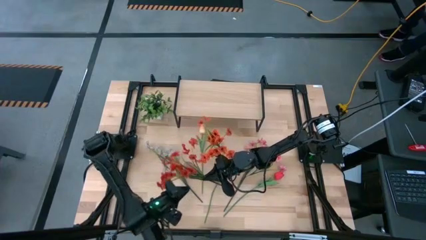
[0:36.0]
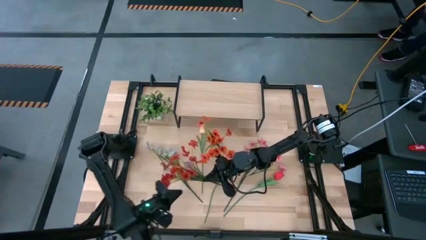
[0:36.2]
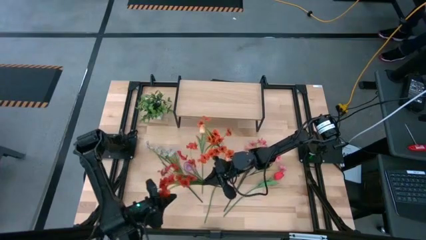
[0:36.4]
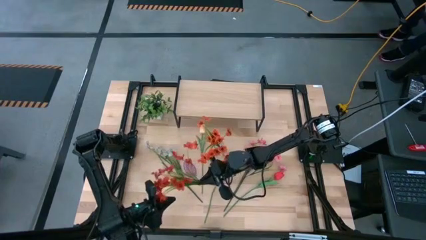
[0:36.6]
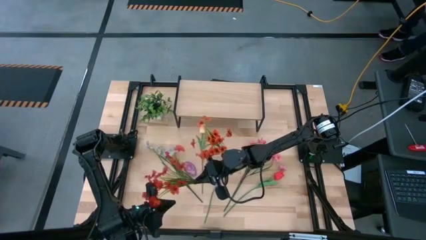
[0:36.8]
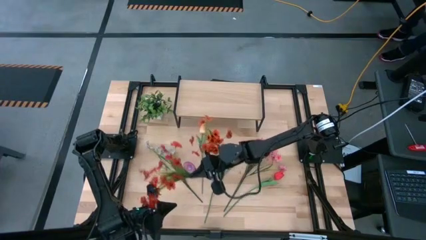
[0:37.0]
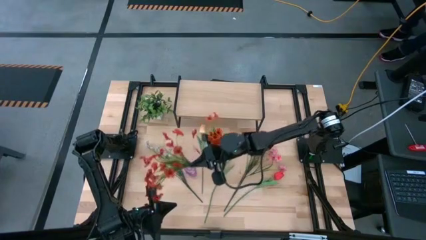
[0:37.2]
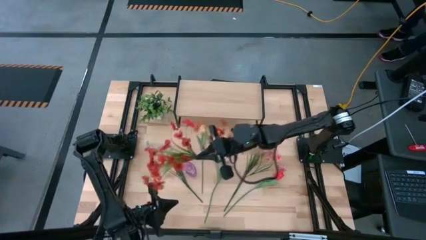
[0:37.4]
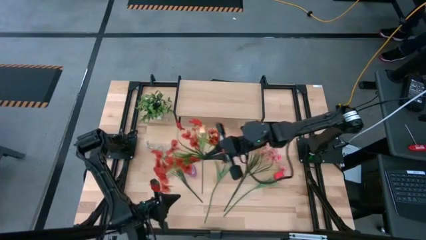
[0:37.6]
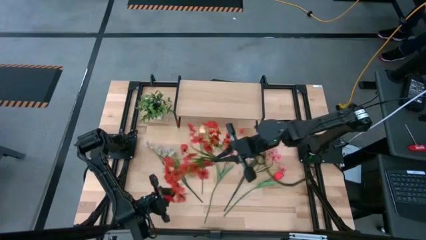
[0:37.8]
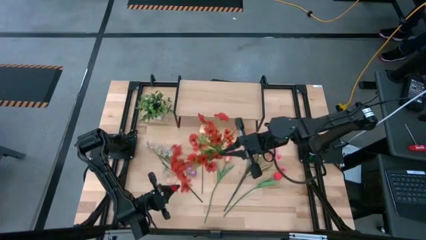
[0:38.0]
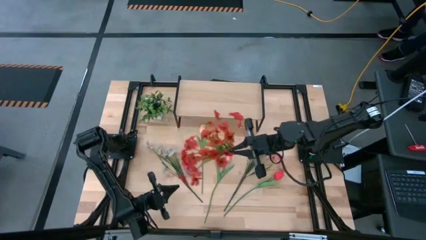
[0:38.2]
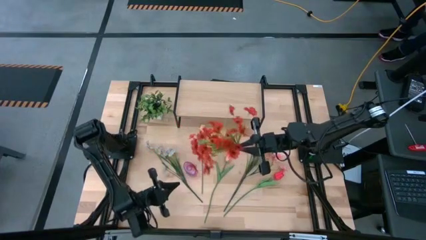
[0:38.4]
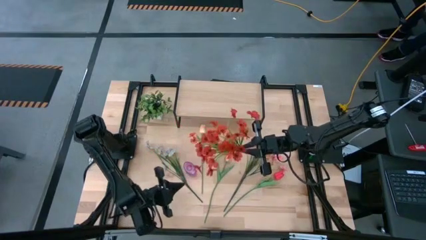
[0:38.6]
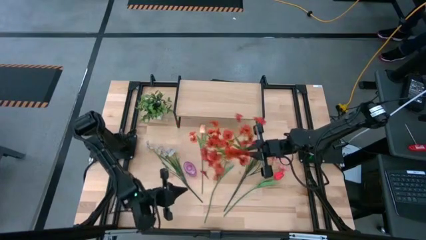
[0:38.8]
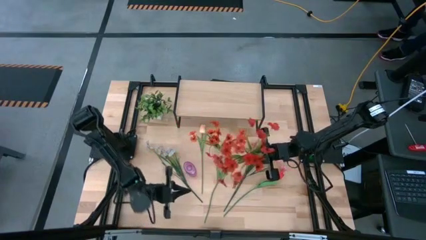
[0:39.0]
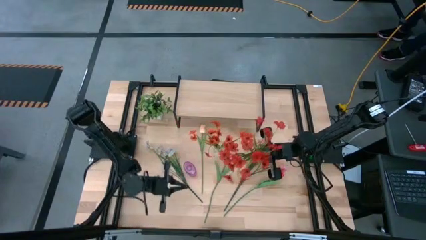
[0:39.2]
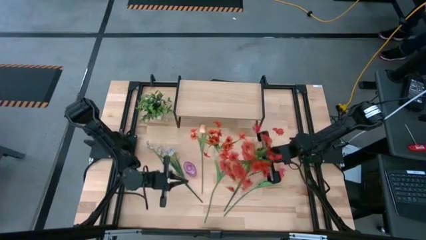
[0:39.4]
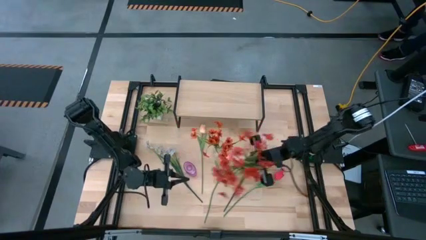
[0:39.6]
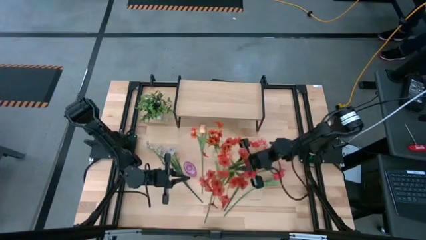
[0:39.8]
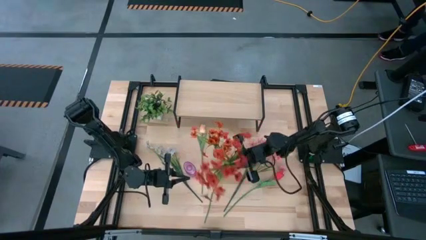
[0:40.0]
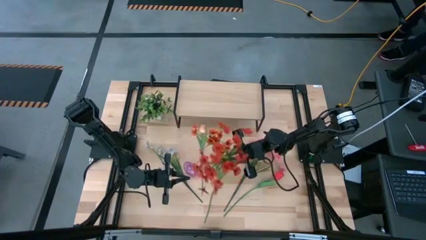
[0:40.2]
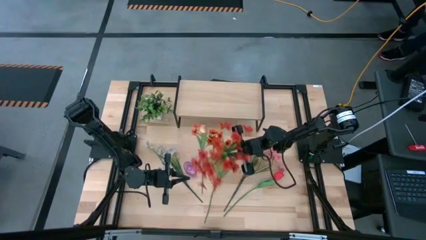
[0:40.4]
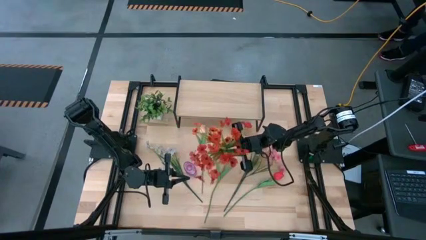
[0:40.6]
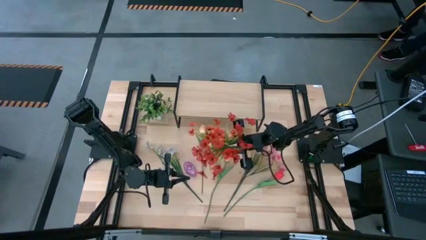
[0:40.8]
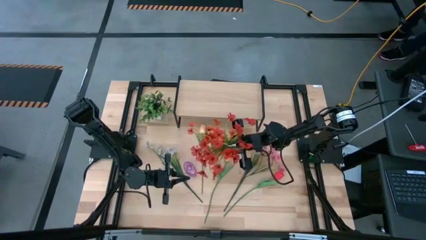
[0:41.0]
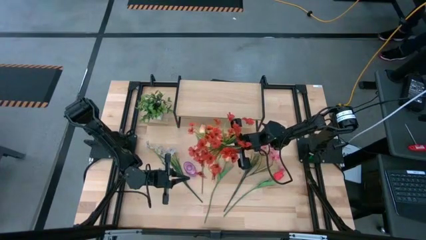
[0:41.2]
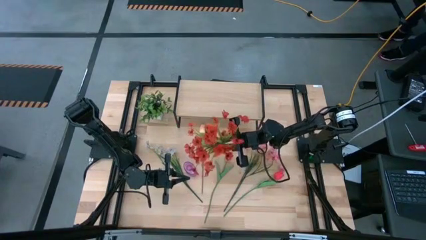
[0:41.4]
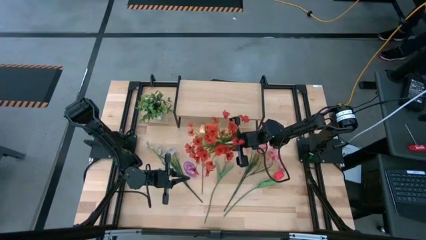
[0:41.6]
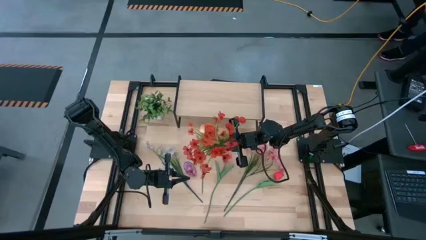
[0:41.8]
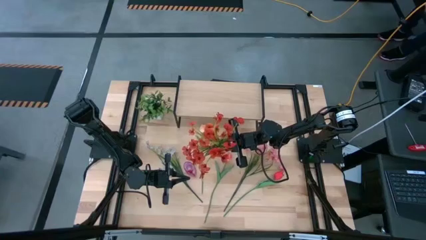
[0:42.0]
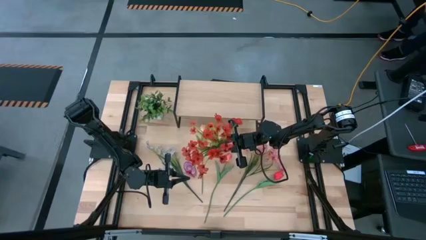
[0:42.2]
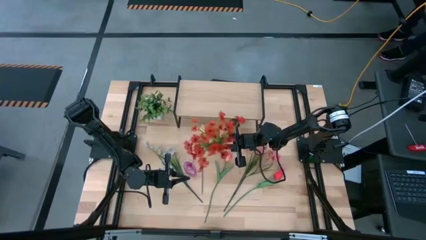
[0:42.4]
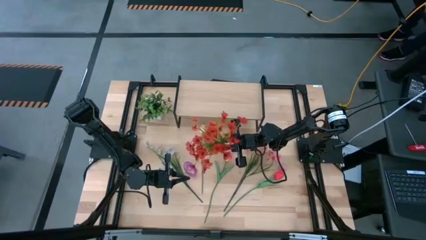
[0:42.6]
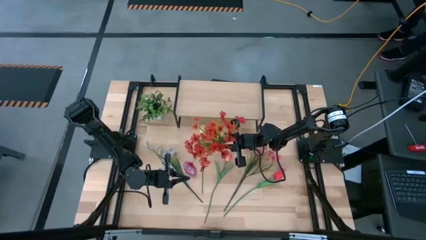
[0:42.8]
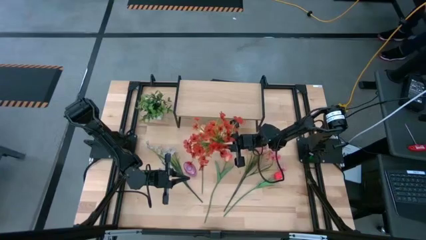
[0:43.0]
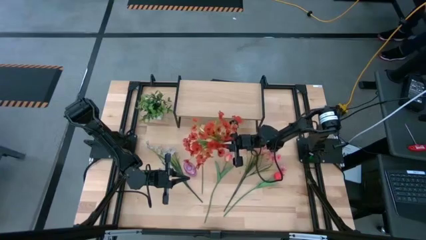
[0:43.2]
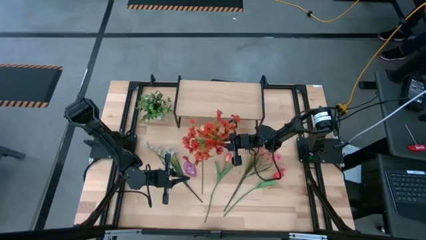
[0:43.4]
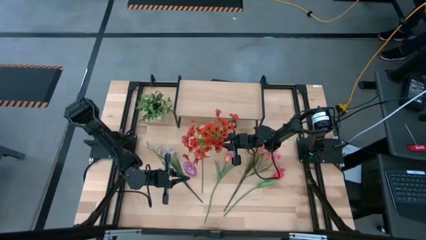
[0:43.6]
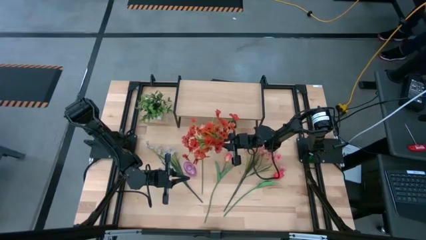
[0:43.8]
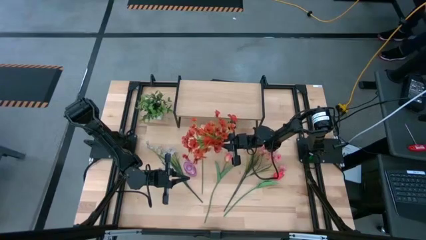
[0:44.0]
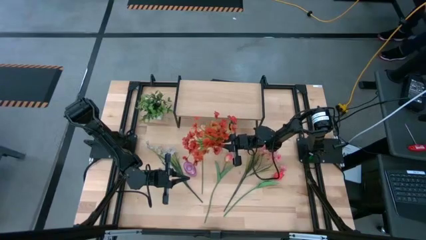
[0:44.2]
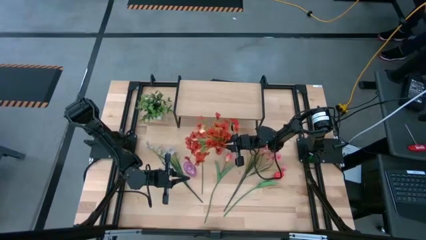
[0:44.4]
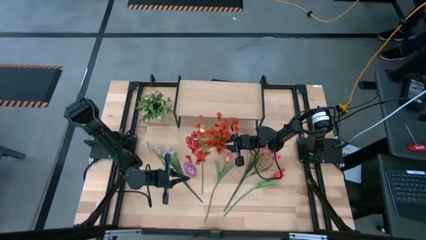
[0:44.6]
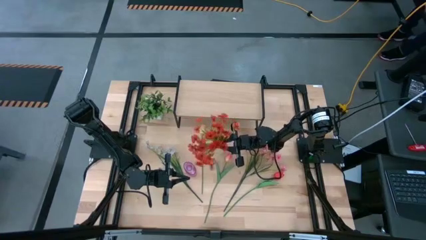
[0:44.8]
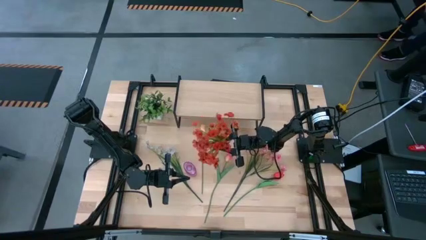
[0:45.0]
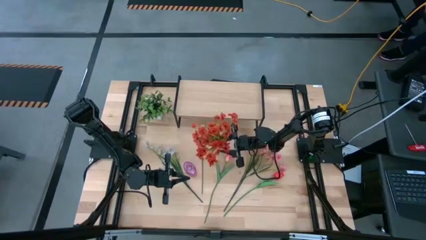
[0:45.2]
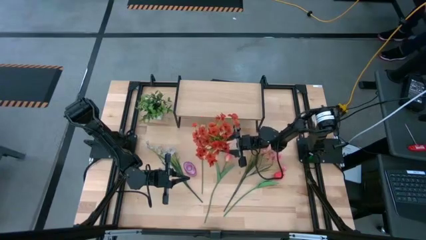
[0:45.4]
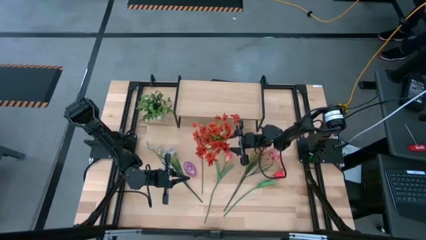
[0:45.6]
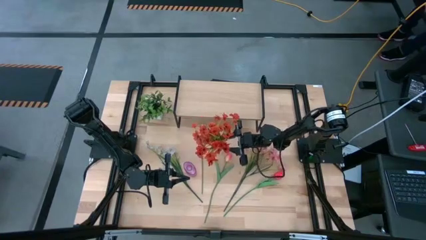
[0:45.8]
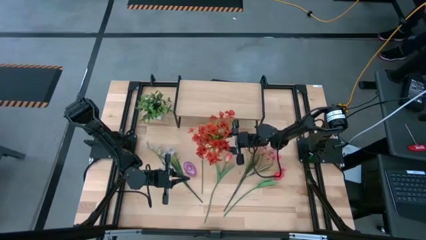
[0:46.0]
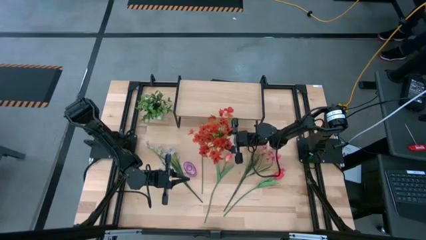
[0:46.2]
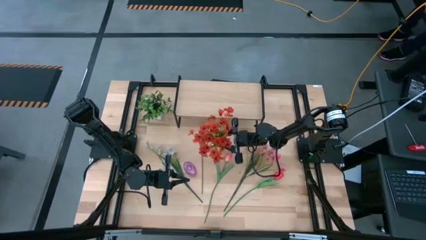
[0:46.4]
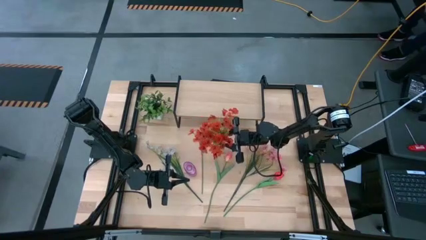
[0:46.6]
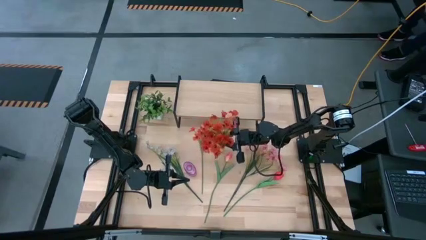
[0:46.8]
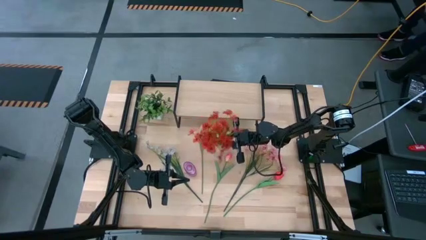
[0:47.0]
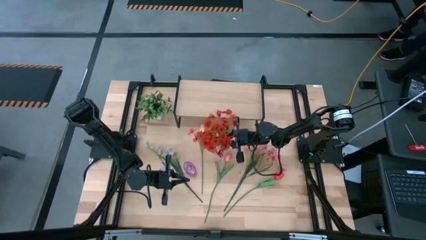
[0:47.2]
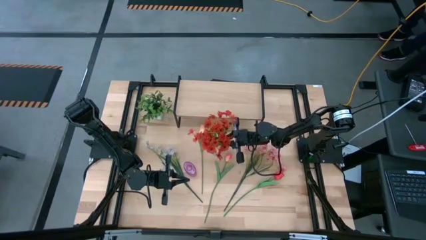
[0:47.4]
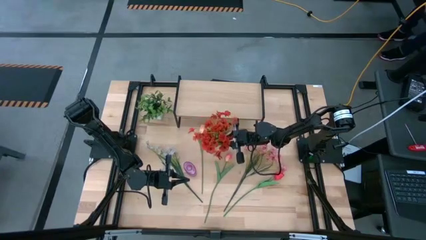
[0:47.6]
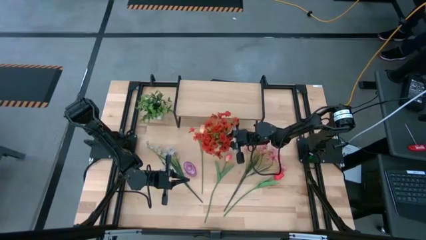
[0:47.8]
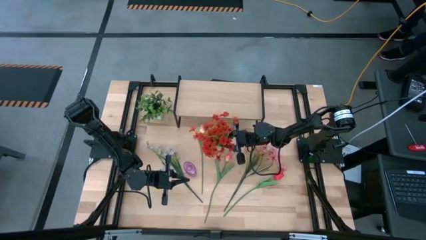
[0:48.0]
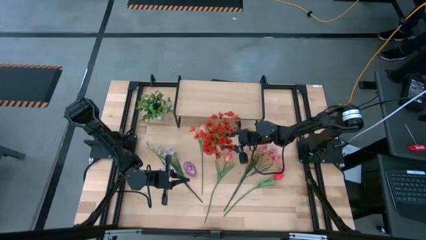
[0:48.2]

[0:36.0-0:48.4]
Task: Pick and place flowers into a vace then onto a shelf
Put the orange flowers into the transparent vase

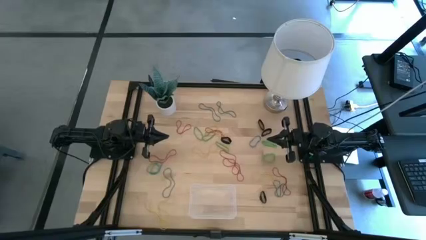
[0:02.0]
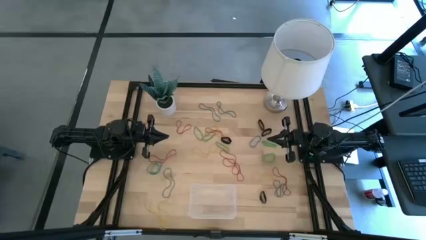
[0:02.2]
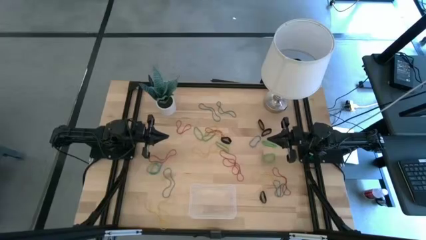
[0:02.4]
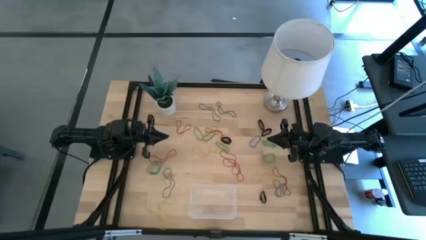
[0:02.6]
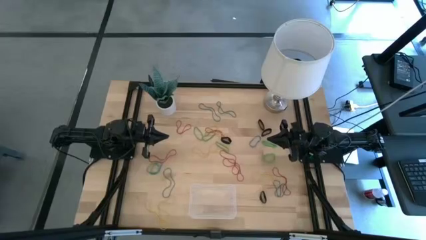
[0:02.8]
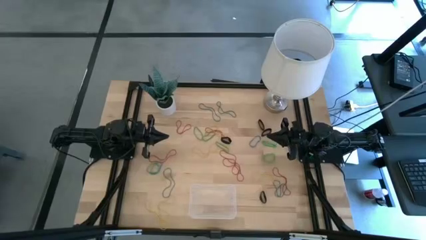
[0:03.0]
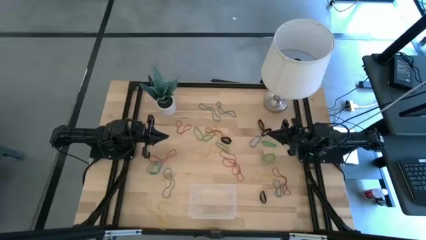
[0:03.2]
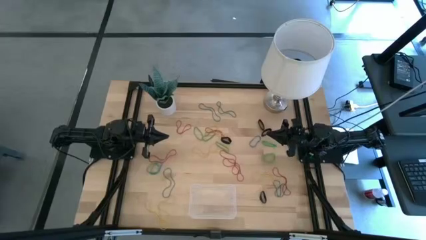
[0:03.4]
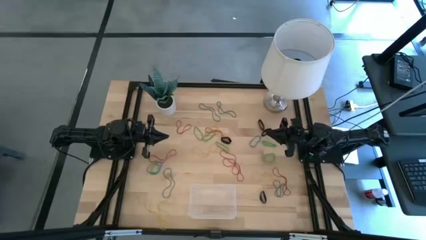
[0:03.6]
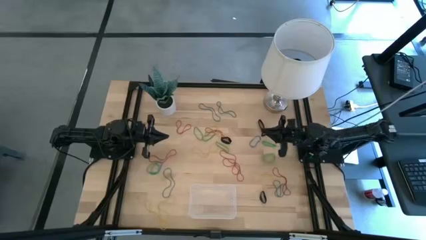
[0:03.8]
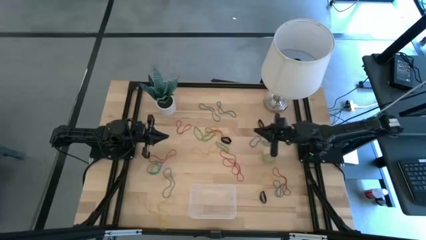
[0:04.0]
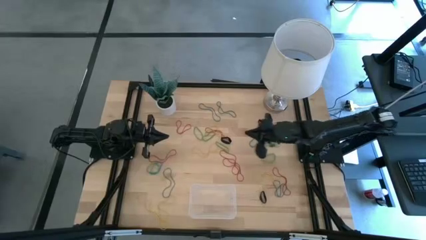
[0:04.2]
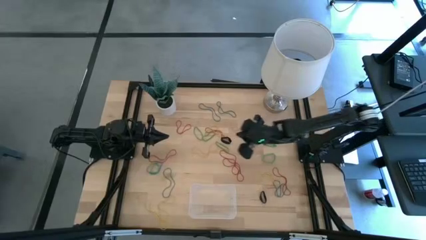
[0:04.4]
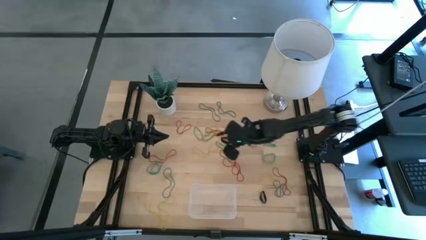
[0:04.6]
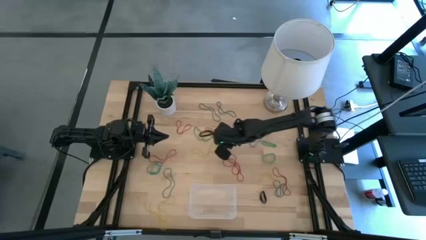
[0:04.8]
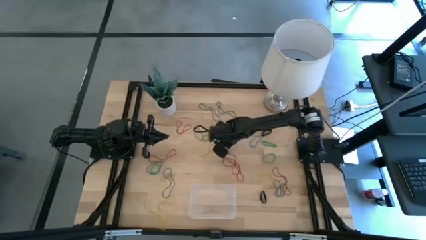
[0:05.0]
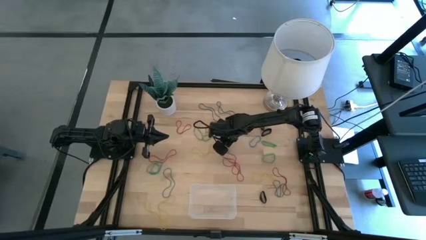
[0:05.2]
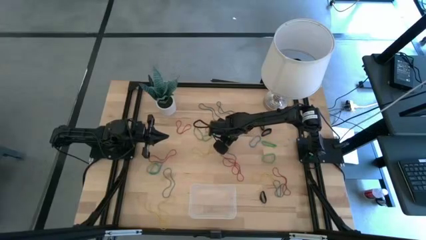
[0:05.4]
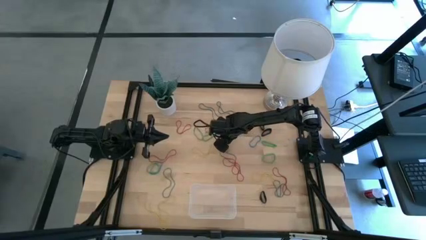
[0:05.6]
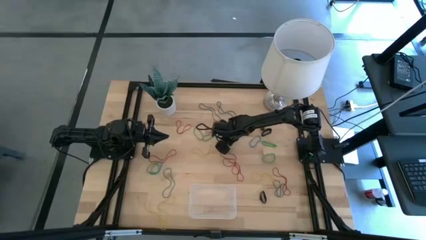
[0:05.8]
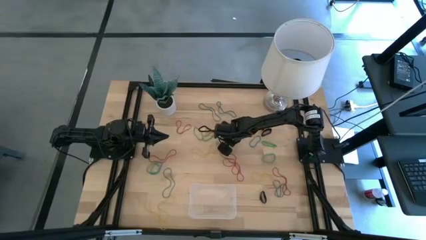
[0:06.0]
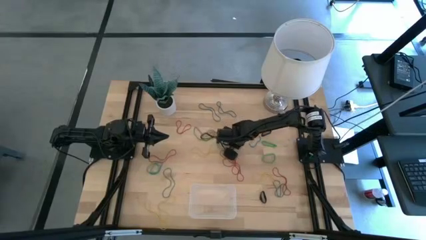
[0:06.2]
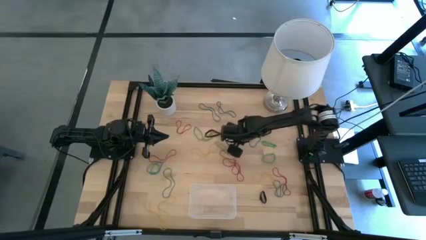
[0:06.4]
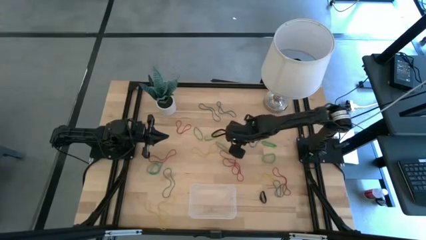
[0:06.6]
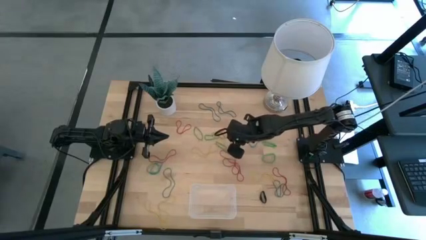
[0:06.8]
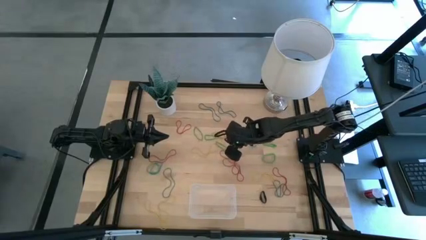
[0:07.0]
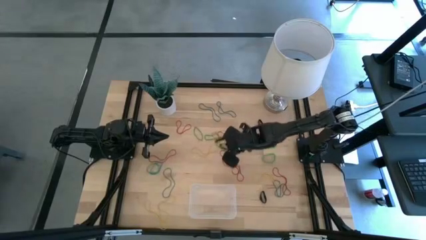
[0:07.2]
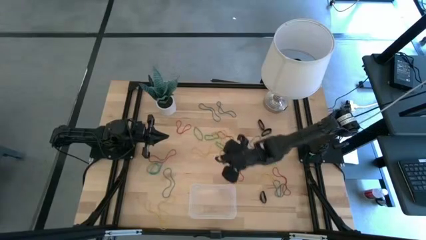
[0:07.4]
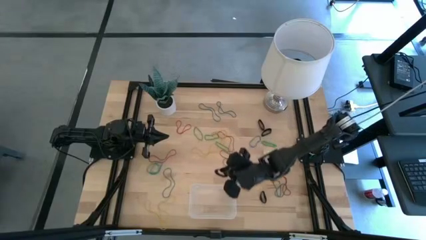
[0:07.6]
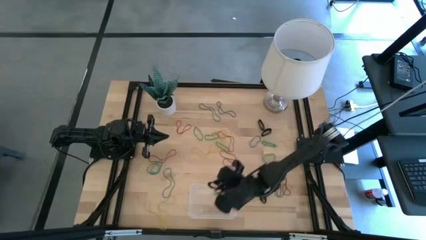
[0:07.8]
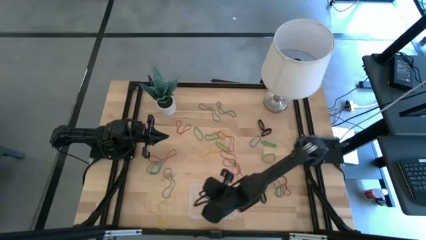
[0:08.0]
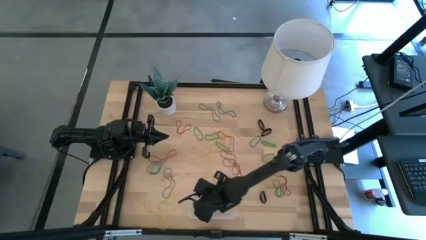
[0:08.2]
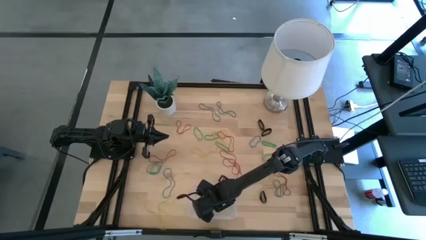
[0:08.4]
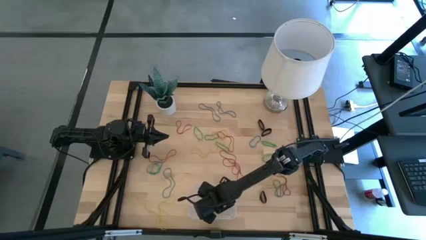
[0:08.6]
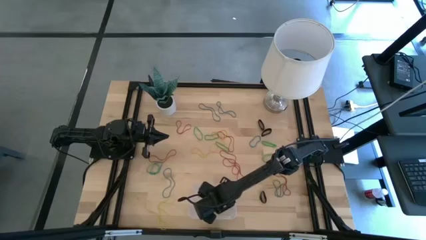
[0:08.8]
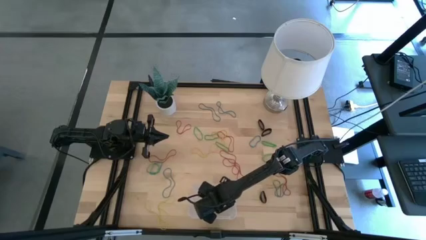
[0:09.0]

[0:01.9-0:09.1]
Task: Pick and place rubber bands into bin
Put the black rubber band into the transparent bin
